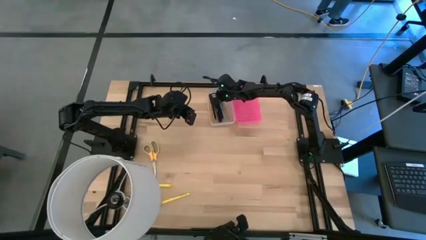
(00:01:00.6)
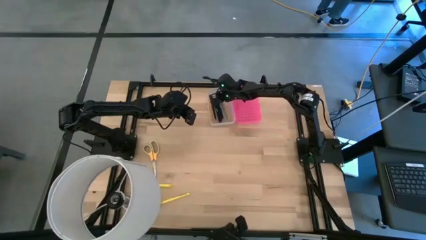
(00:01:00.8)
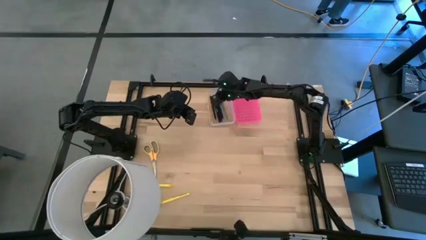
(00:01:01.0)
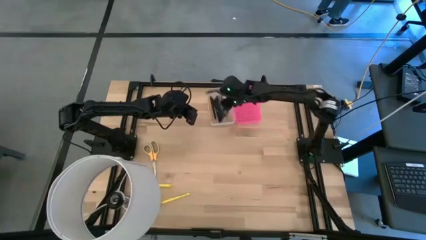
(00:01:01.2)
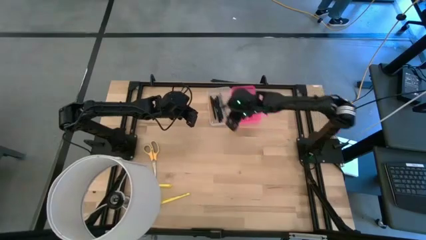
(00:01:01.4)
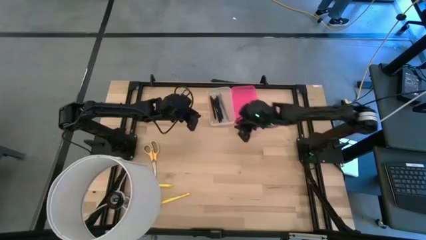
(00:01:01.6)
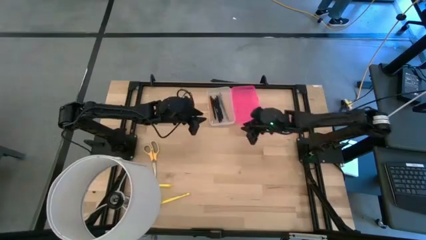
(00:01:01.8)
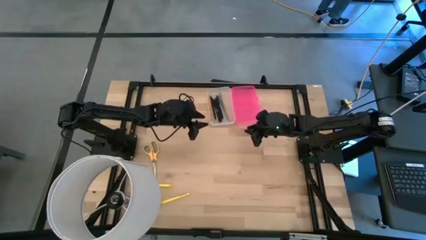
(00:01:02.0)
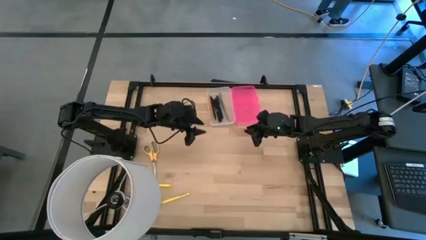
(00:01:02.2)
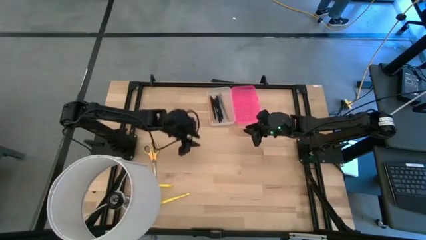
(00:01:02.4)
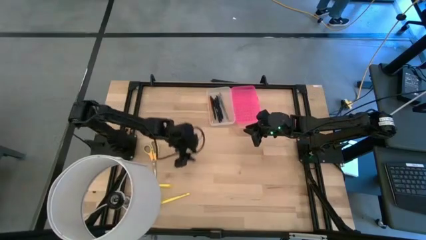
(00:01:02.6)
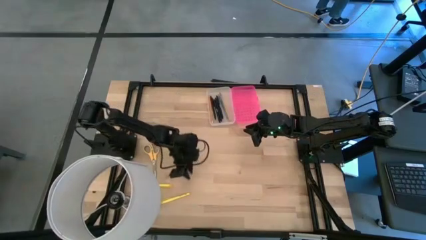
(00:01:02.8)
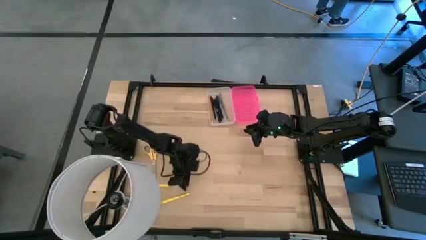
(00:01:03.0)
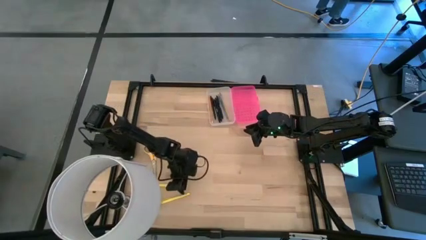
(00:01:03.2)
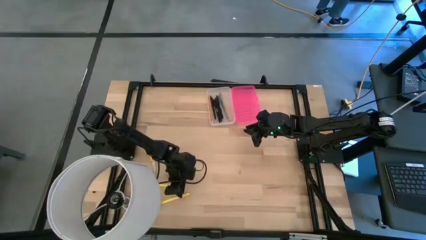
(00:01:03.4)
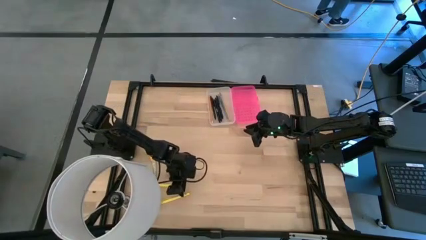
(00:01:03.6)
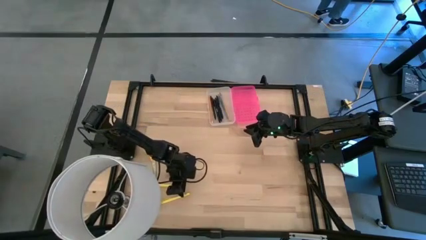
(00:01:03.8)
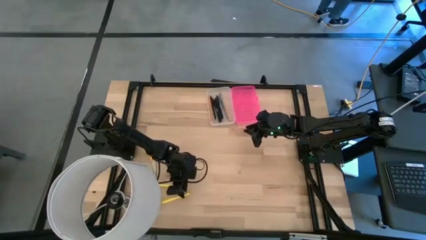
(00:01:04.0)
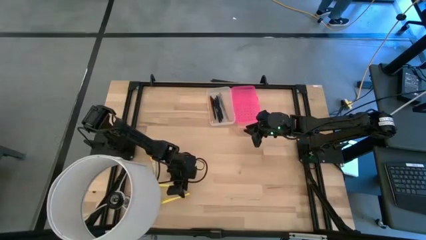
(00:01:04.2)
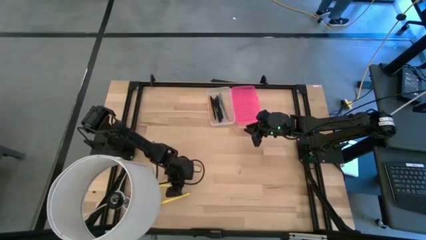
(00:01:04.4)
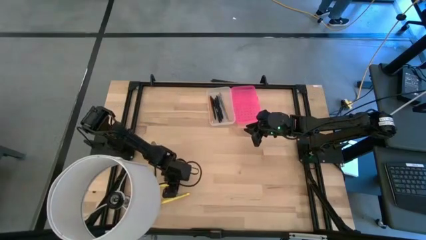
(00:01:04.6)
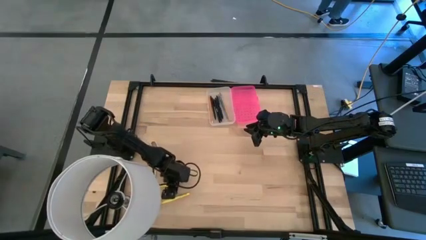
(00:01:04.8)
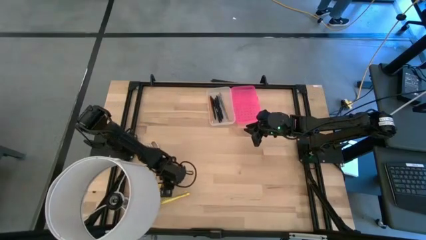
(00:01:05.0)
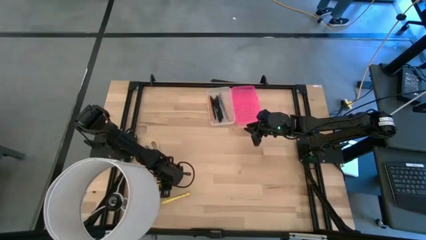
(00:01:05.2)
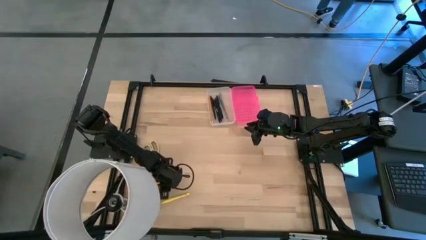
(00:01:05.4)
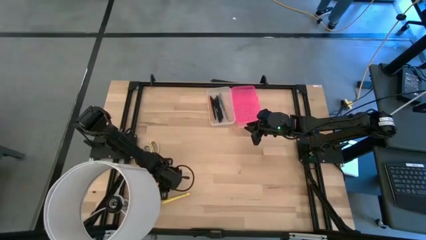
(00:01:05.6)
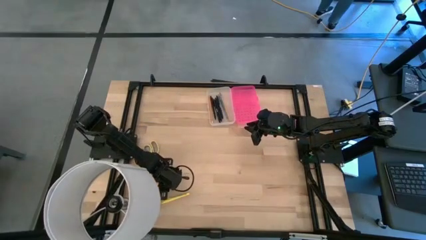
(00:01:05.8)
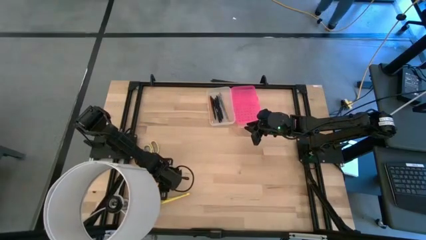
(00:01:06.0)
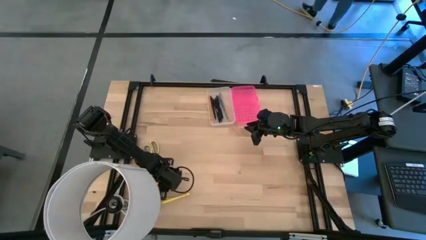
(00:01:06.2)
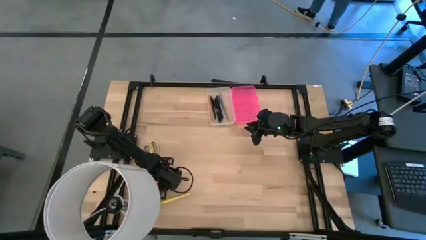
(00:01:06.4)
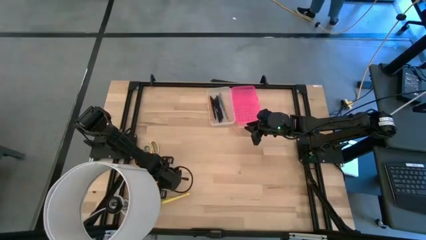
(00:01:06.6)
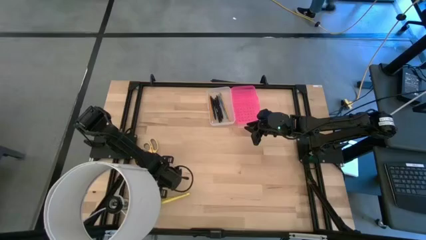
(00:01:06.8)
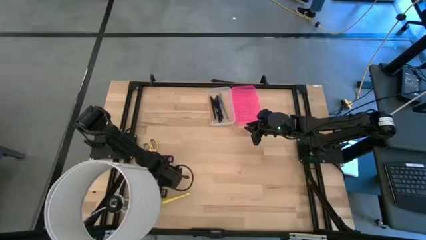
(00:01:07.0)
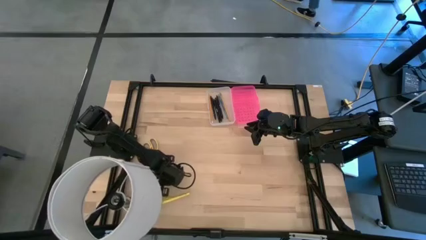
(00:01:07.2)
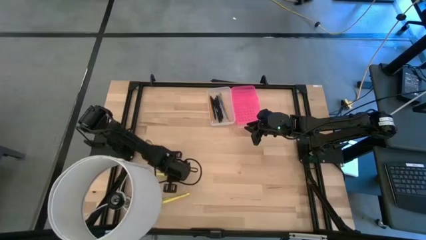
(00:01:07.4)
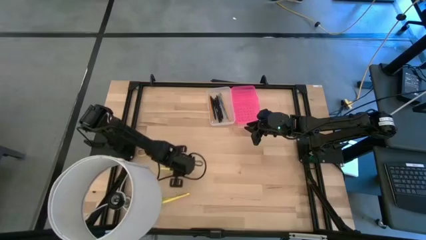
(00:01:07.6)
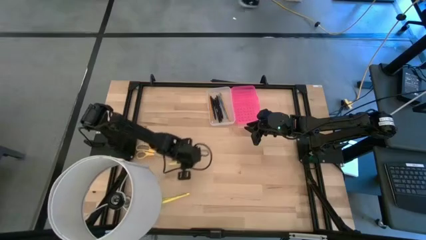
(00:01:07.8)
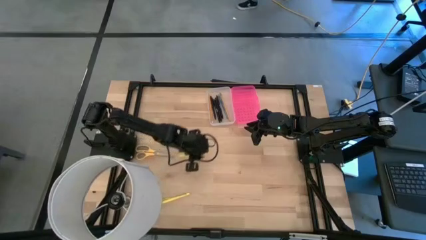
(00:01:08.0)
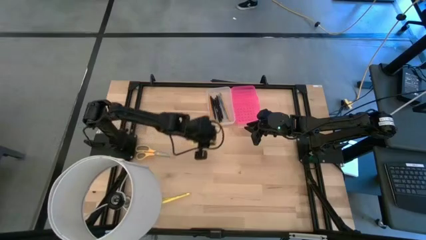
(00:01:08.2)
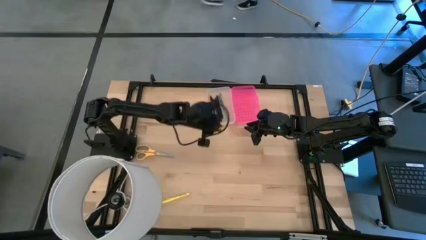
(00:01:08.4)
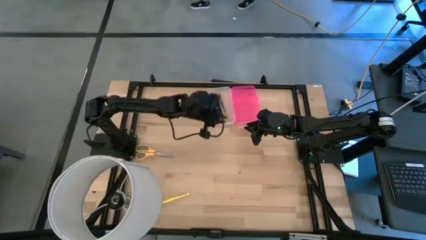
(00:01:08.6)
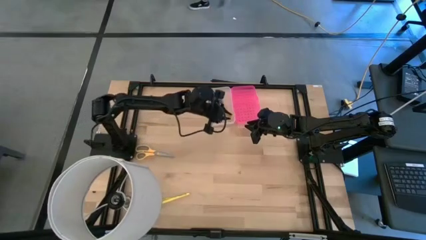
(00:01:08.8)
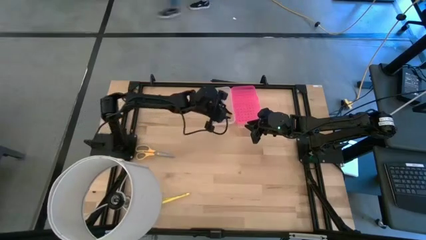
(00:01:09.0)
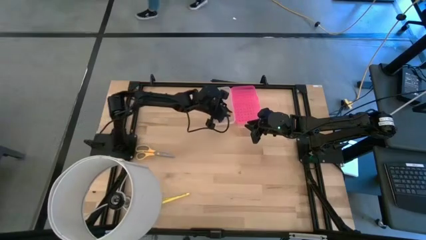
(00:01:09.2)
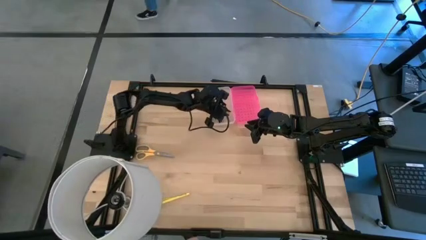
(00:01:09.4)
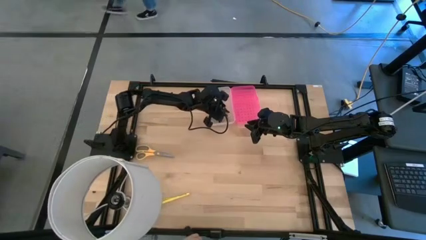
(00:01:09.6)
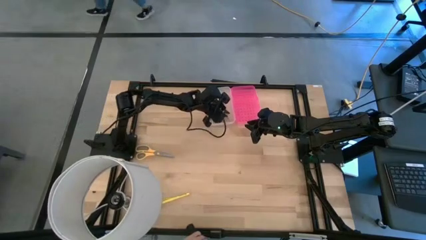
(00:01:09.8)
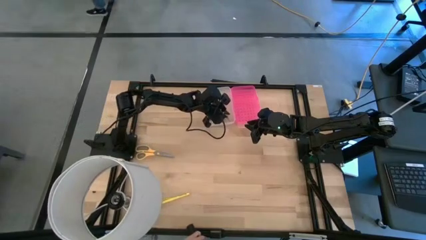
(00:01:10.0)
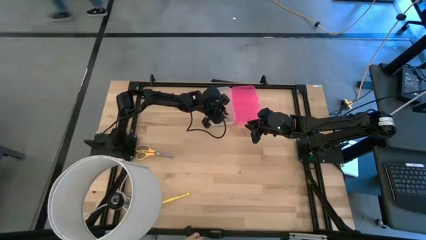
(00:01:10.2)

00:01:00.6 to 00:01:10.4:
Task: Pick & place school supplies into a supply box
Put the yellow pen into the transparent supply box

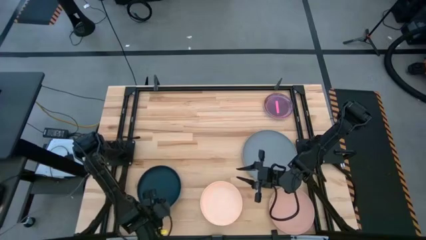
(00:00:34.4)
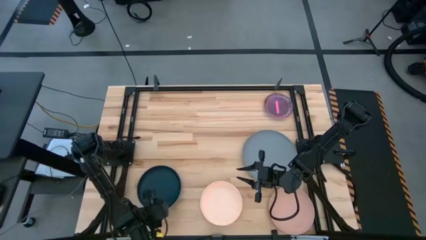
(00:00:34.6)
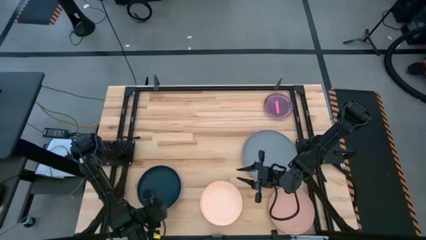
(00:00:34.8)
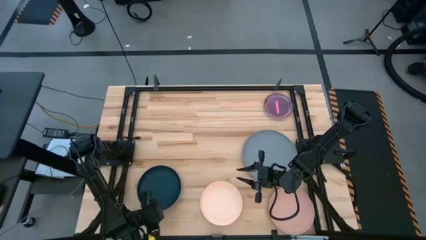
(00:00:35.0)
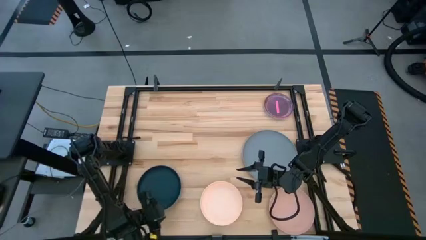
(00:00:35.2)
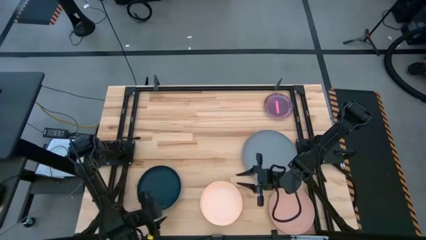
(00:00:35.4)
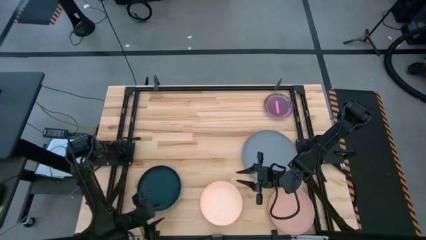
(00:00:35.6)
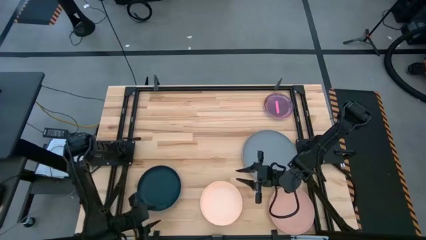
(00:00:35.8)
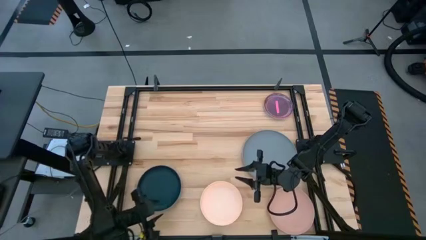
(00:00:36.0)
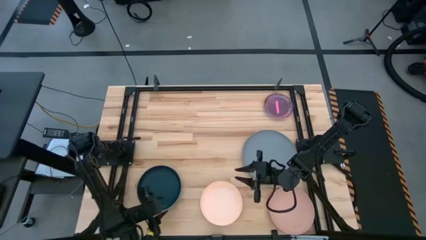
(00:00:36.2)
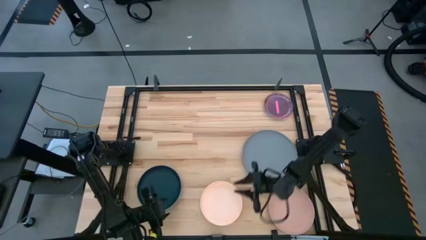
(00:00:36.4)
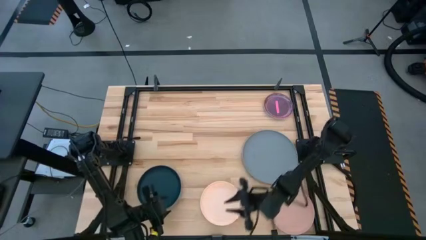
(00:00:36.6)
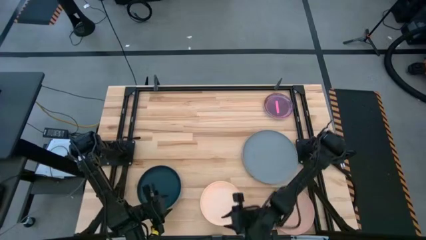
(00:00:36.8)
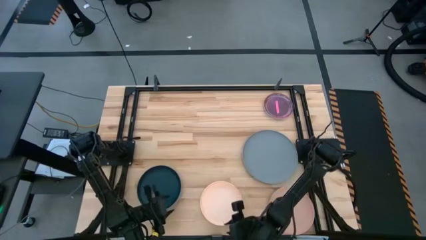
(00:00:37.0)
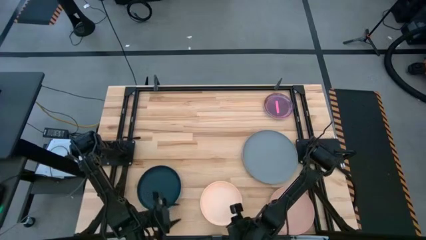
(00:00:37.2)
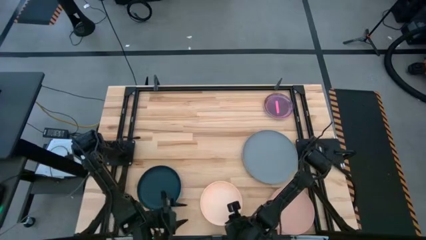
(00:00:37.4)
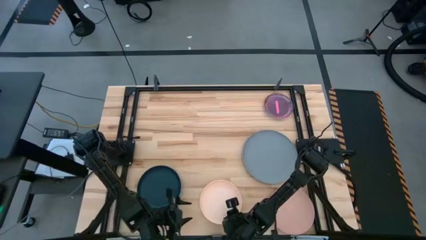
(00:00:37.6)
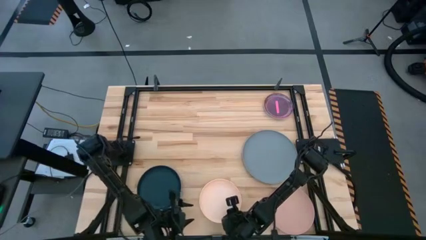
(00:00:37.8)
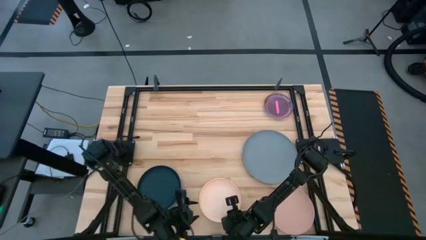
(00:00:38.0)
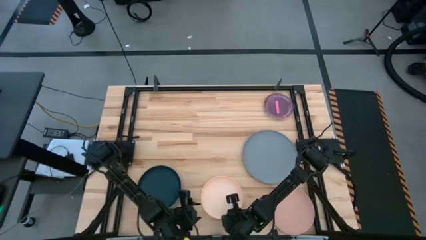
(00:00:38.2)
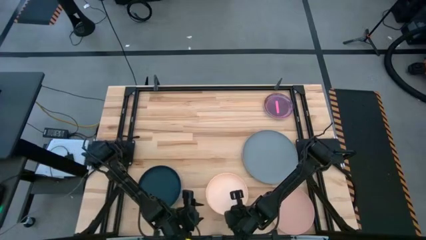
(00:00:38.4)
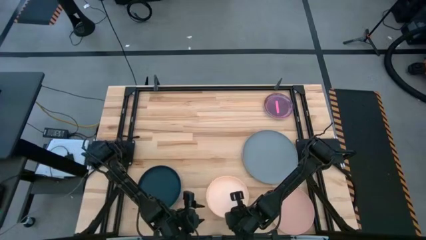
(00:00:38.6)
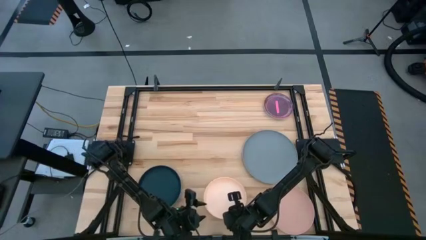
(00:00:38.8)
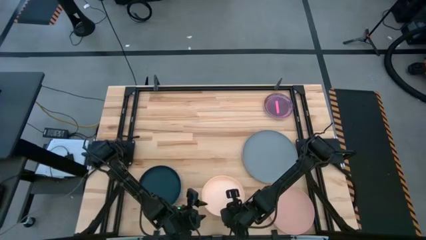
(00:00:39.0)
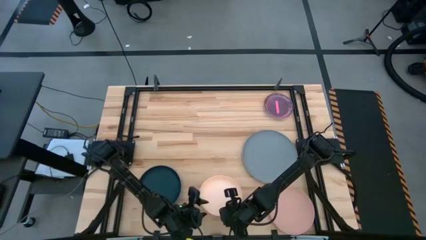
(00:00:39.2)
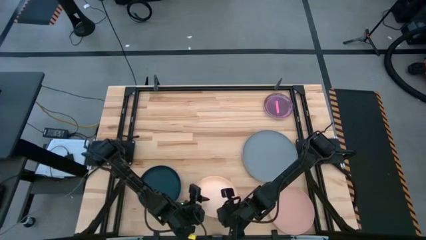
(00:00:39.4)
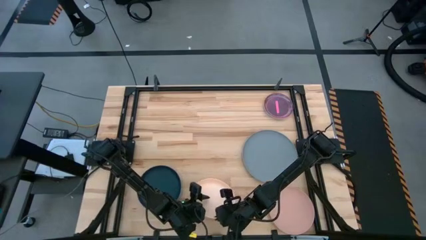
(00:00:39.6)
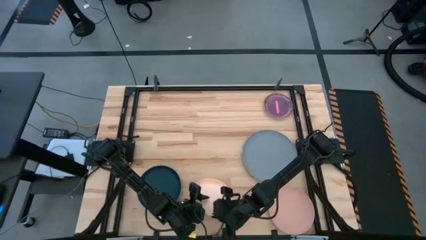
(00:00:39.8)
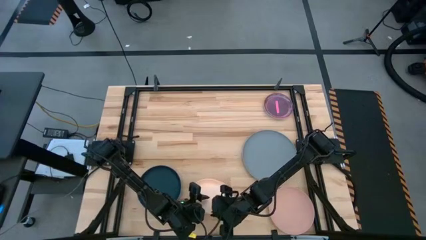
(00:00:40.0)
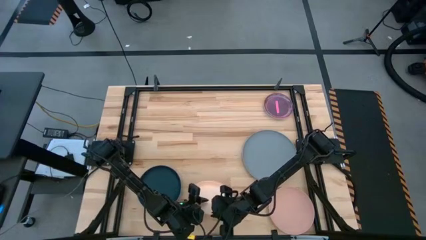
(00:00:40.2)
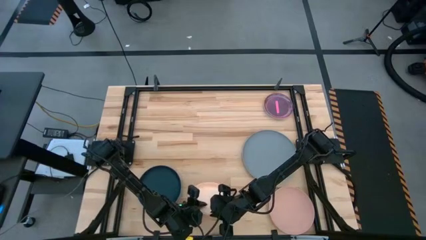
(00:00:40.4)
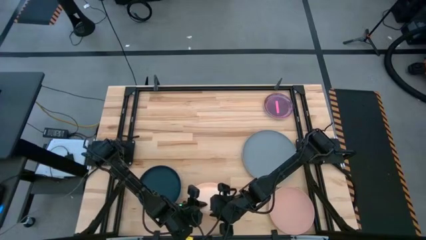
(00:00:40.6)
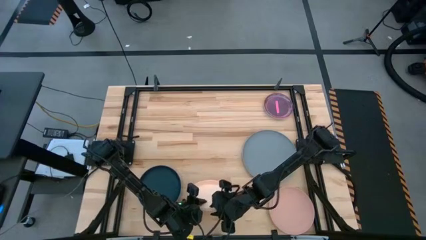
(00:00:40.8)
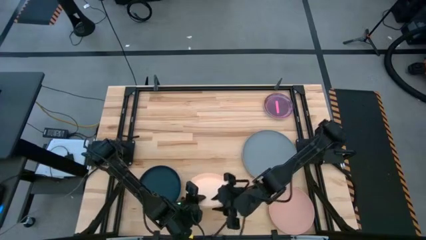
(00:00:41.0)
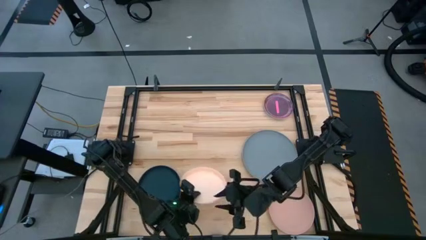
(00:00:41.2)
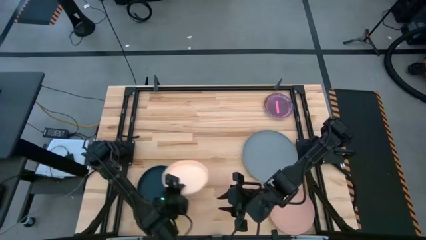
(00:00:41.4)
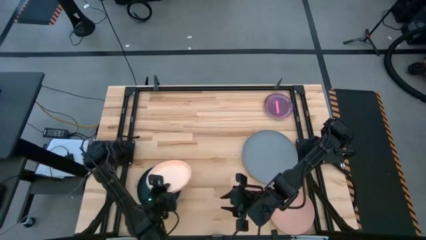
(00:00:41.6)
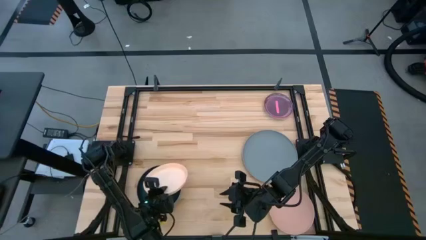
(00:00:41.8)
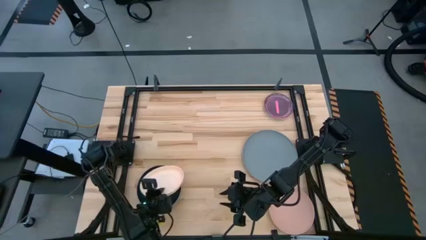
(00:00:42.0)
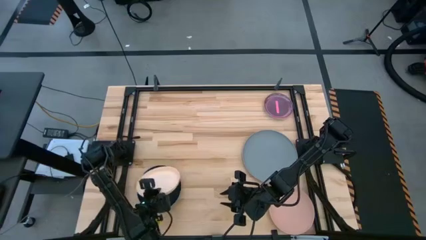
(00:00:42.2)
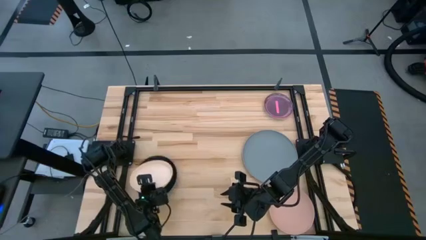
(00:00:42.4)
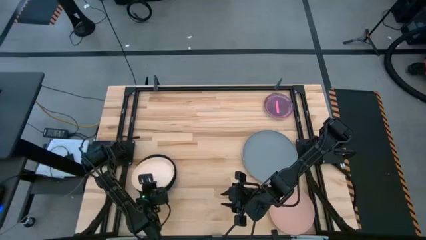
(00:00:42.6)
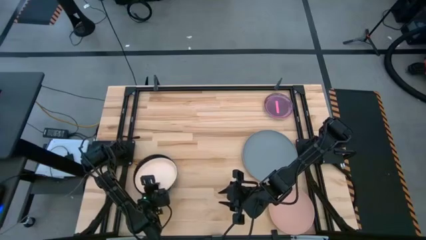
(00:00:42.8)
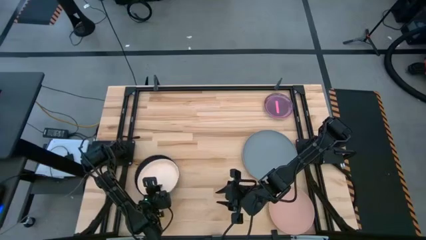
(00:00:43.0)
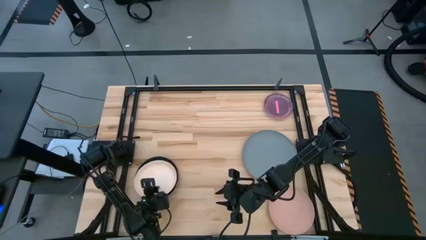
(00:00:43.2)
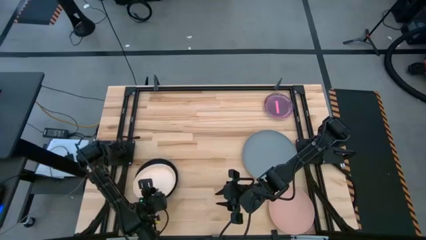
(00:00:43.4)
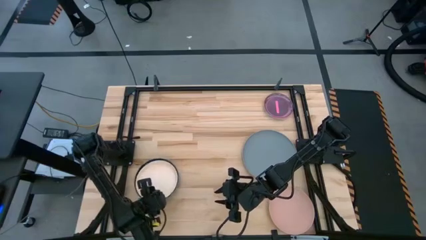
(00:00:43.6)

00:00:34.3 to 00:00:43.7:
Task: Stack plastic plates
Stack the left orange plate on top of the left stacked plates
